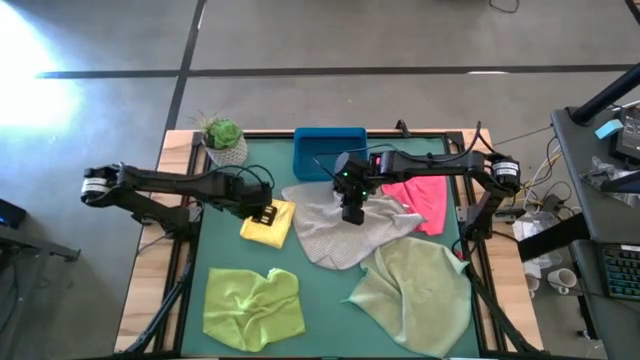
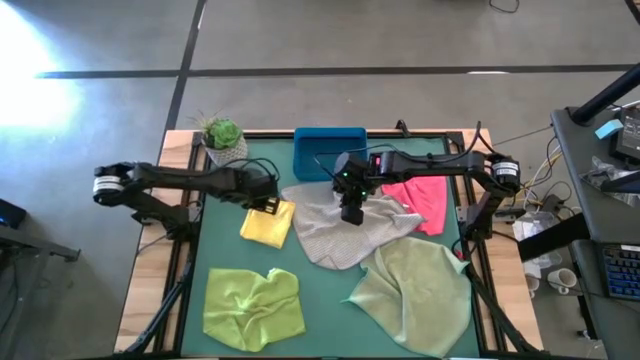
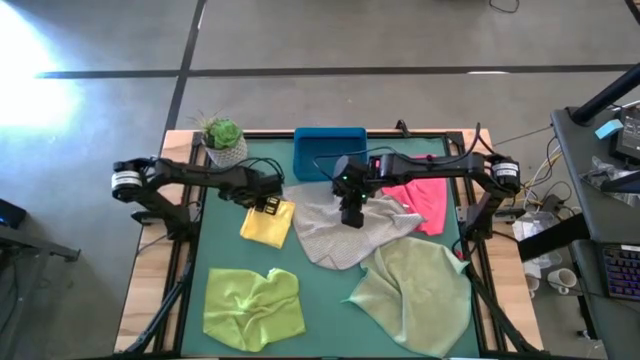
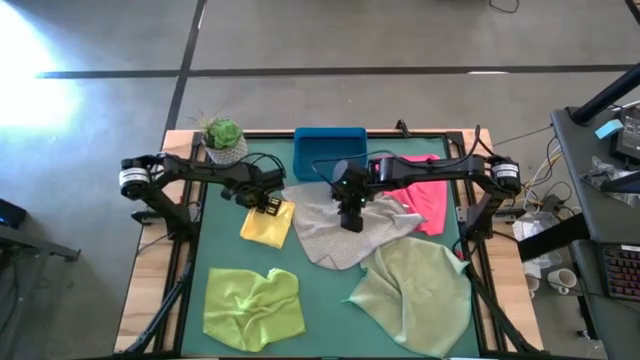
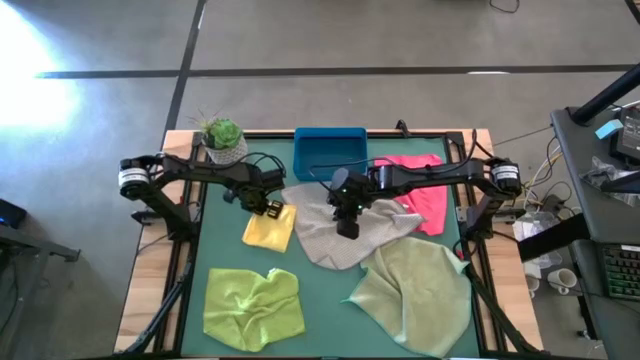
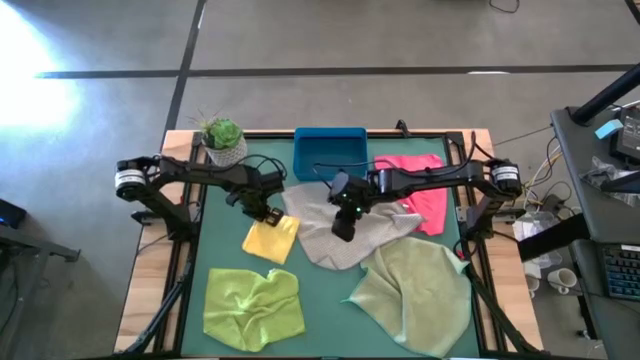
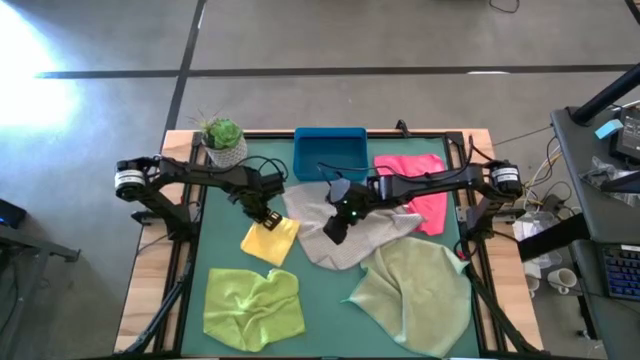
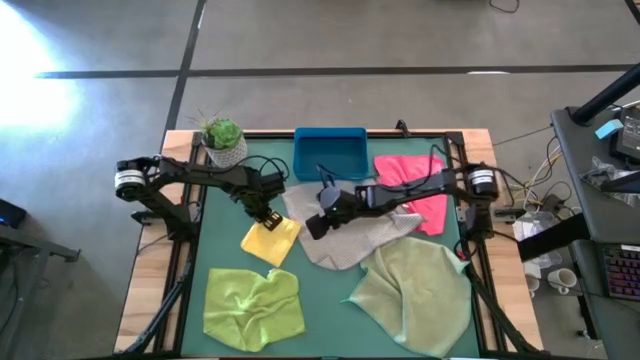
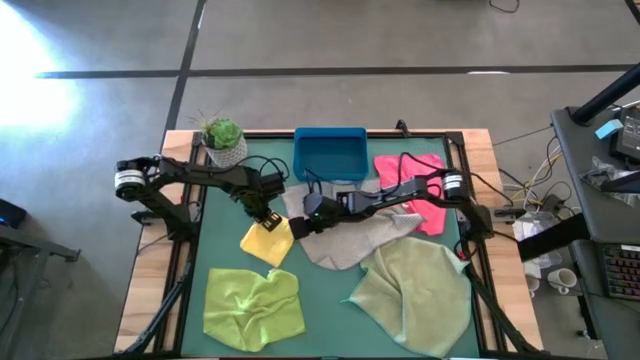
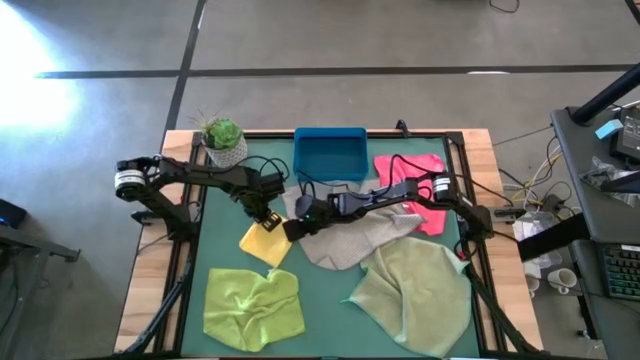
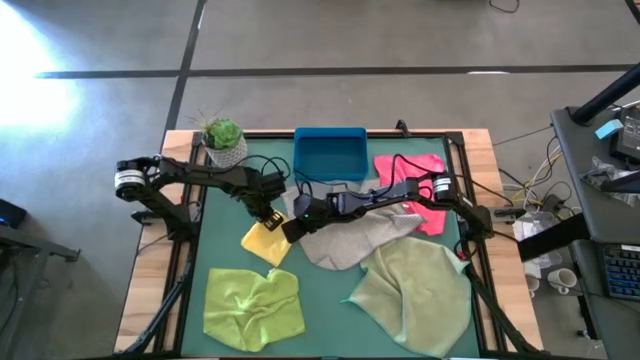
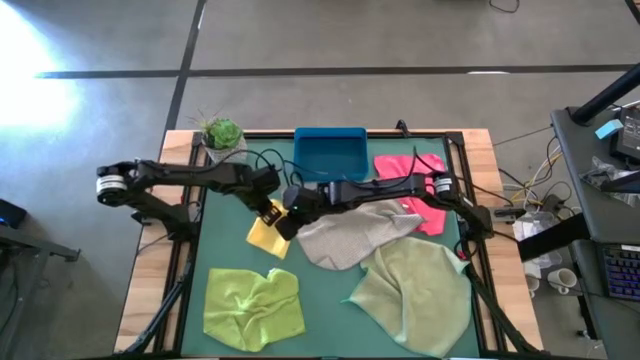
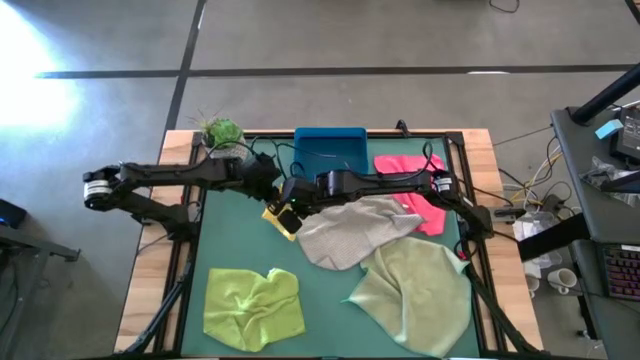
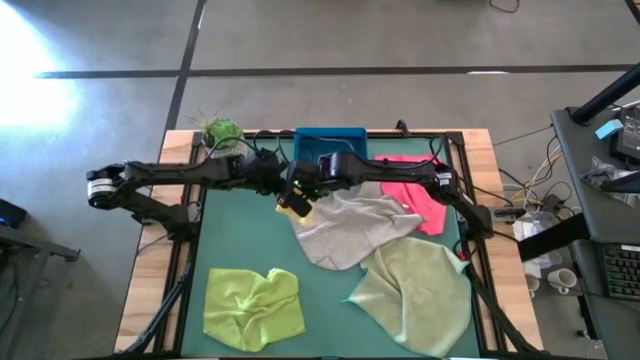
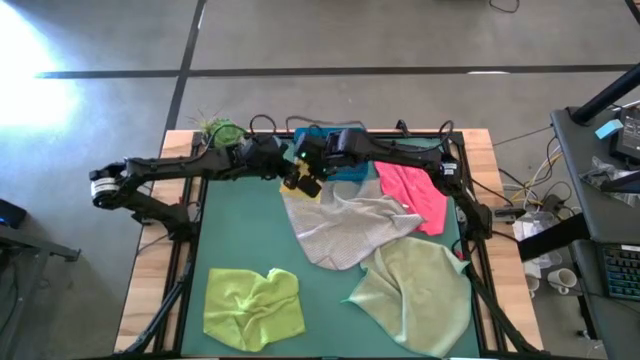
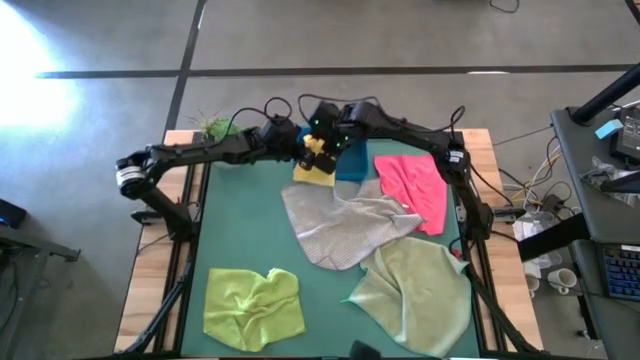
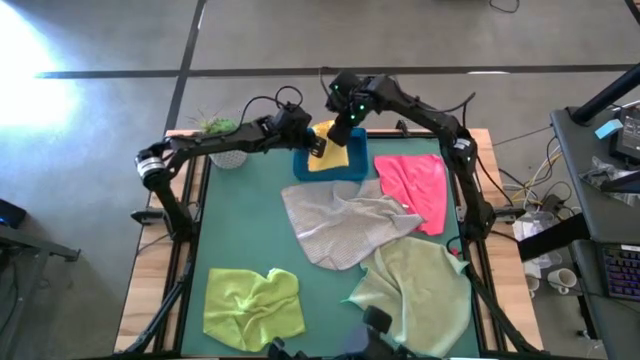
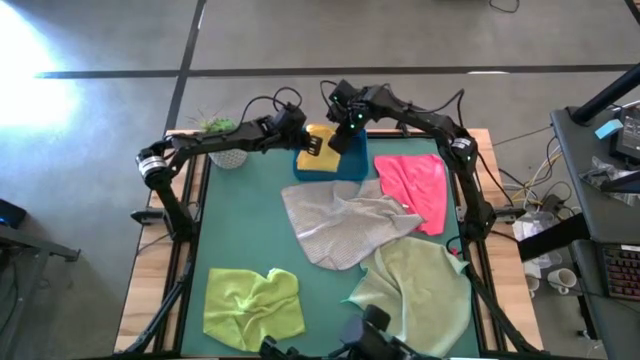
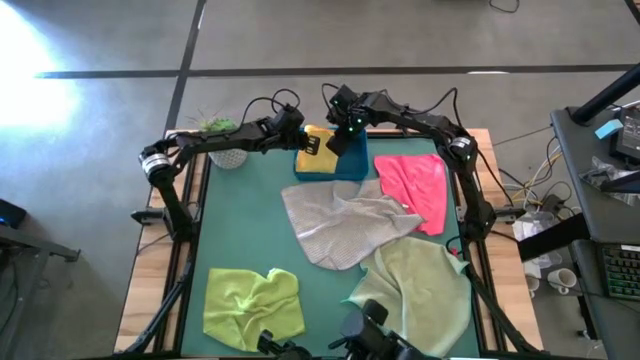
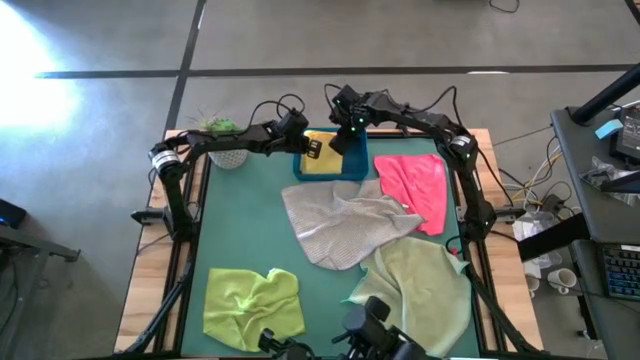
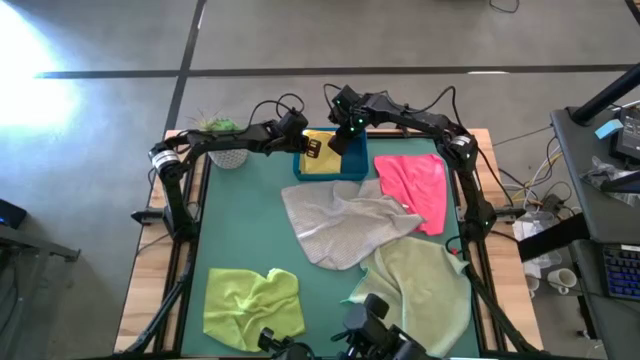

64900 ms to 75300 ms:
Task: Fold microfiber towels
Put the yellow microfiber cloth into the blue bin

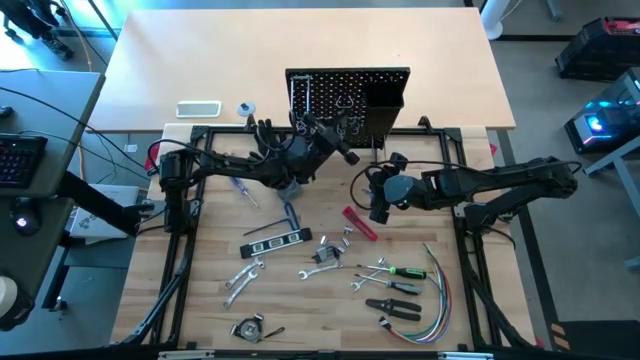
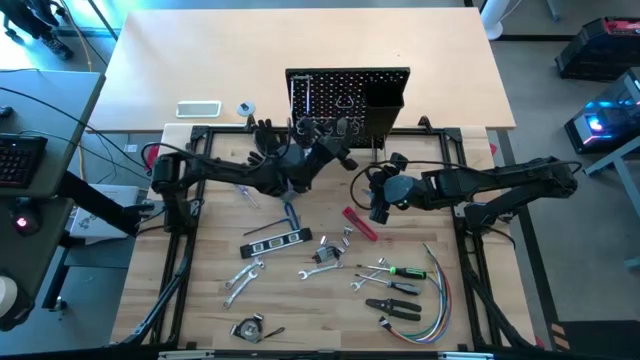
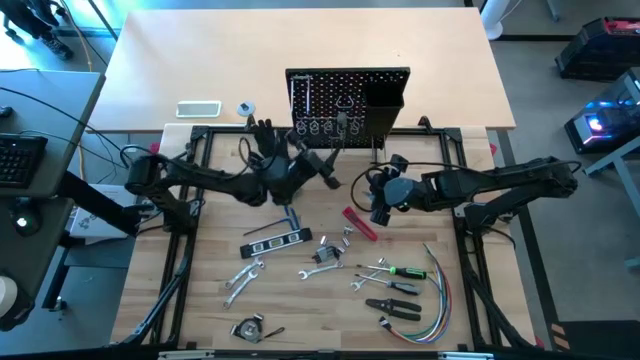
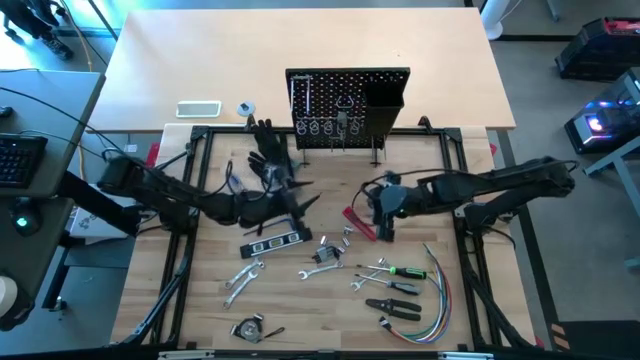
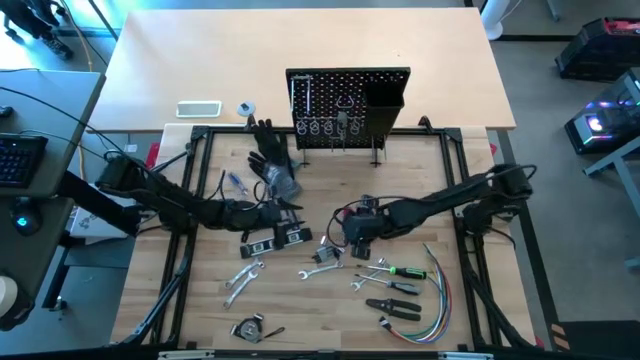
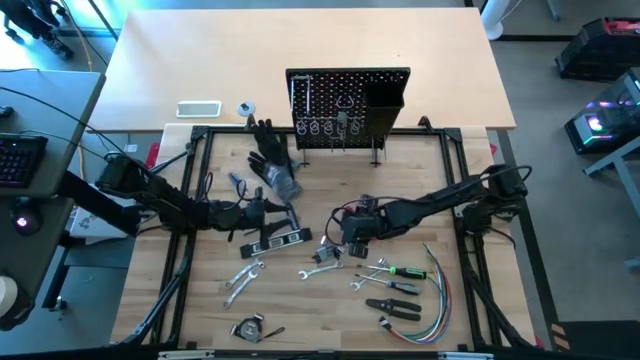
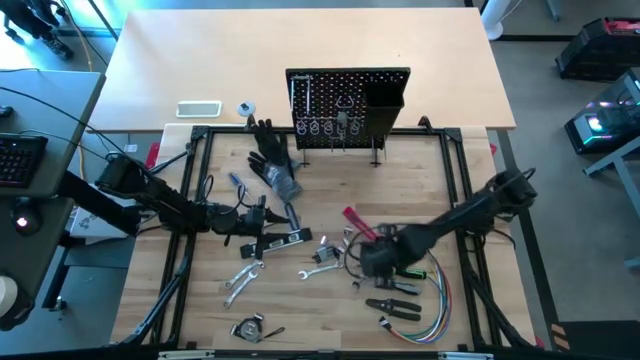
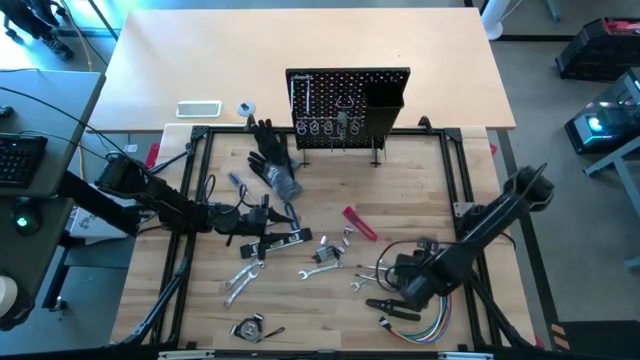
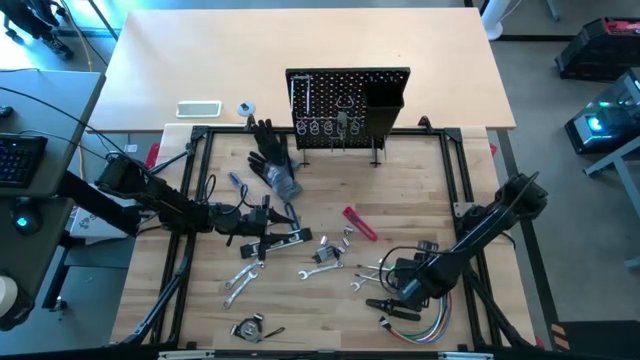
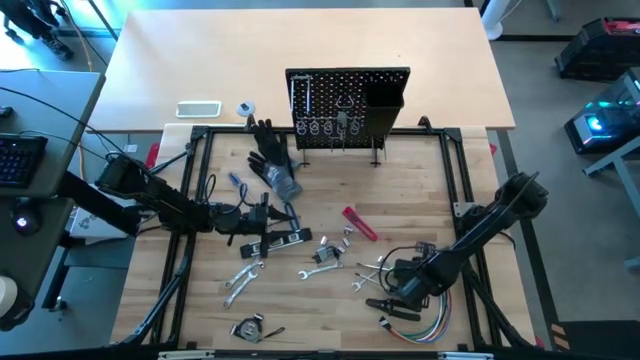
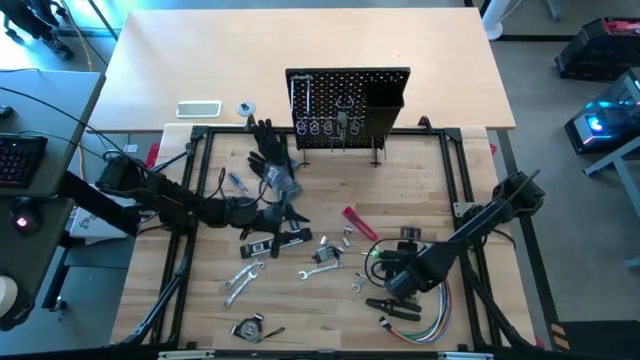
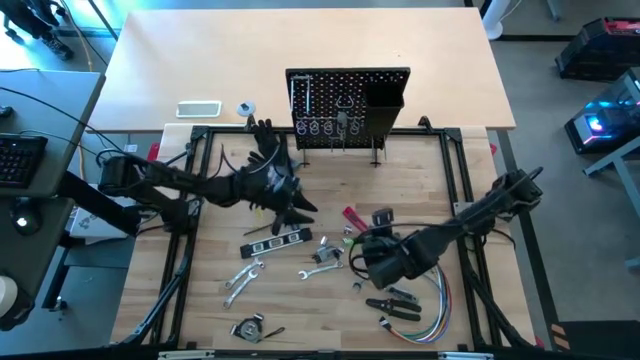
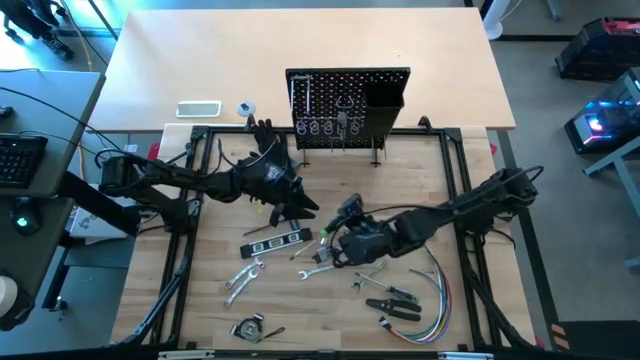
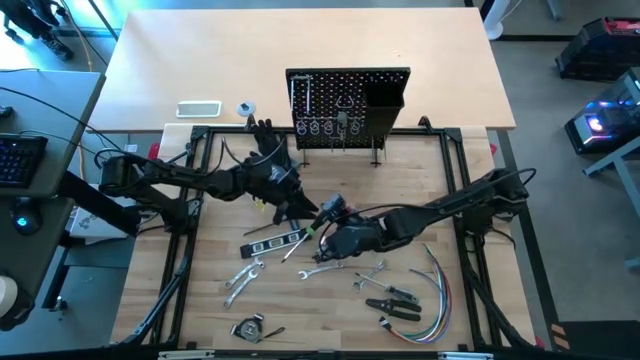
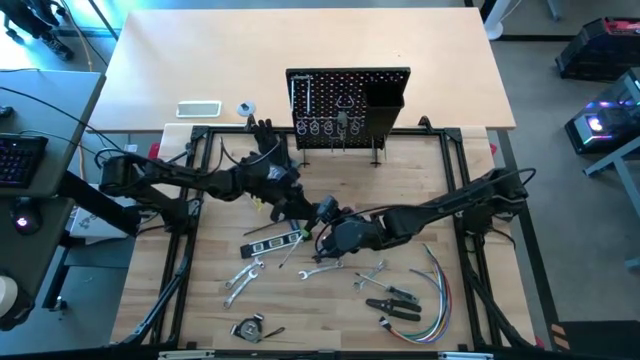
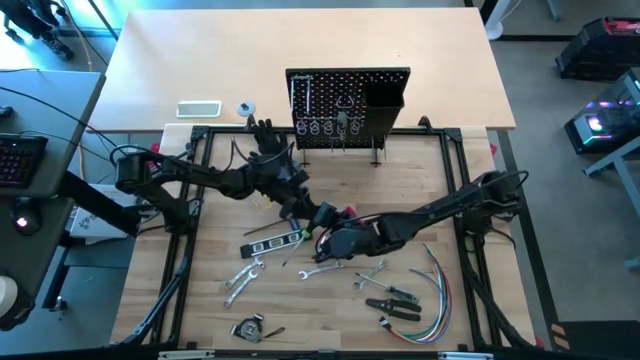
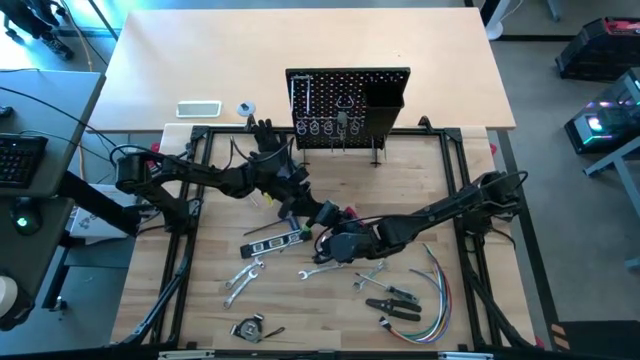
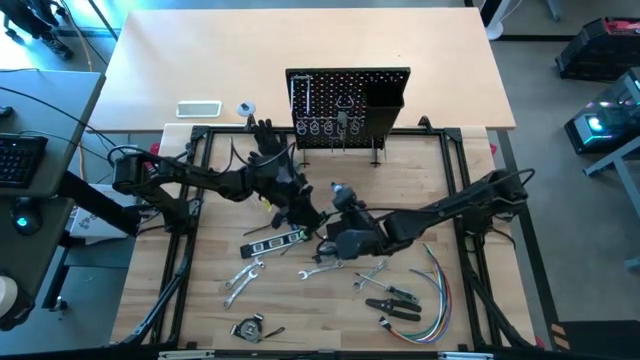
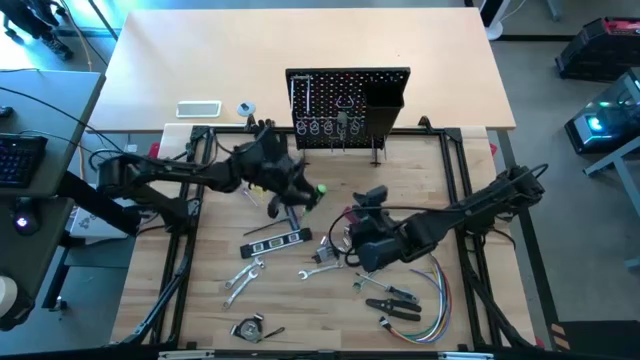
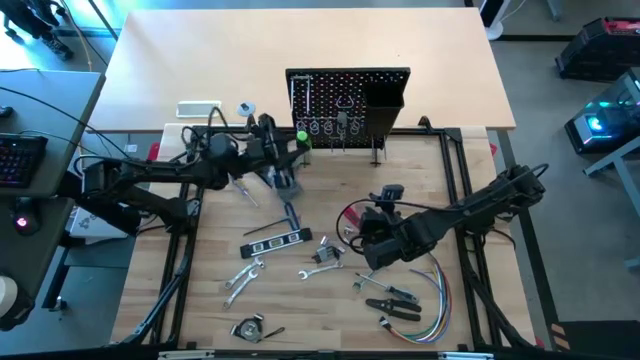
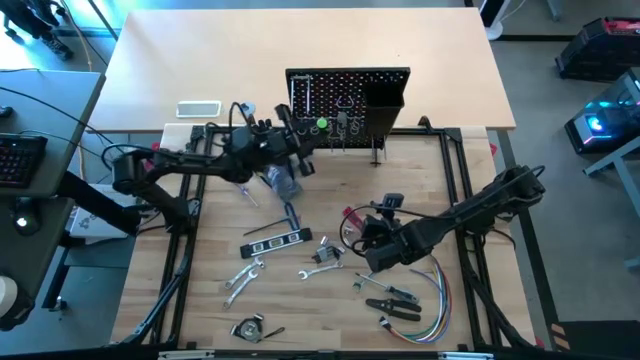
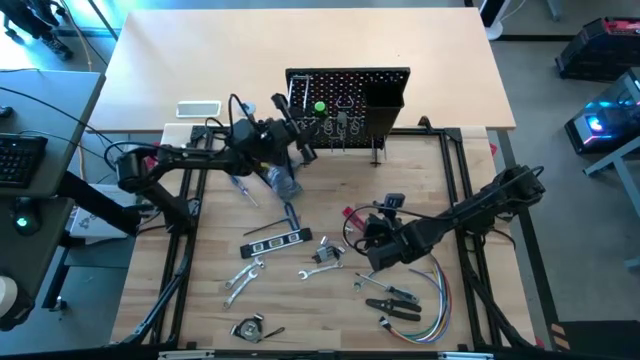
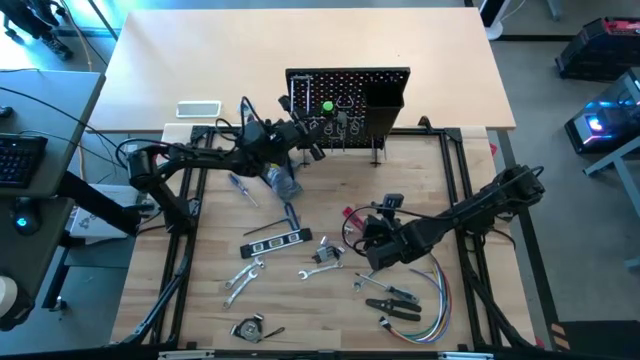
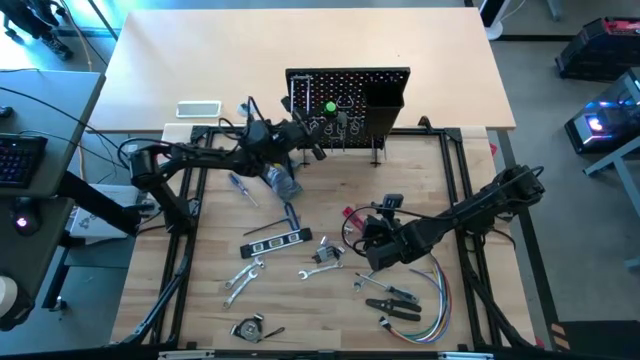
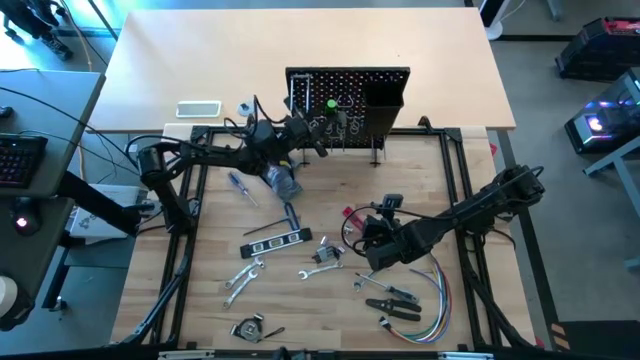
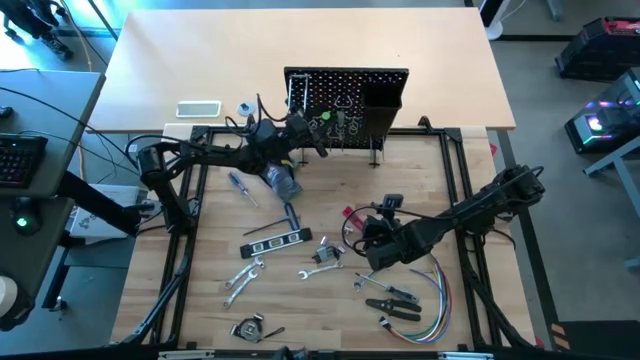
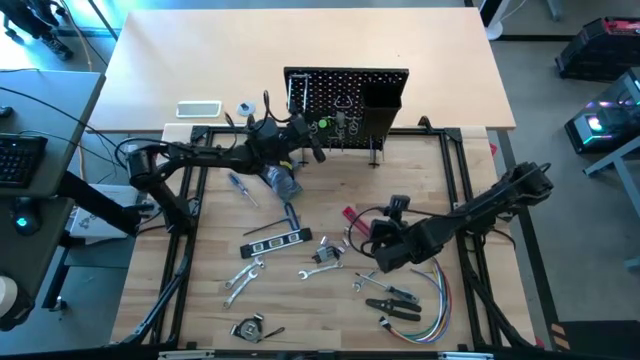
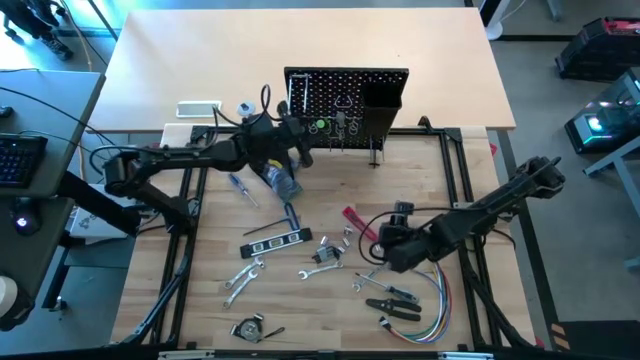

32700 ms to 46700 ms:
Task: Hang tools onto peg board
Hang the green screwdriver on the pegboard
